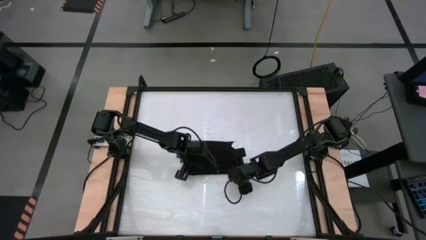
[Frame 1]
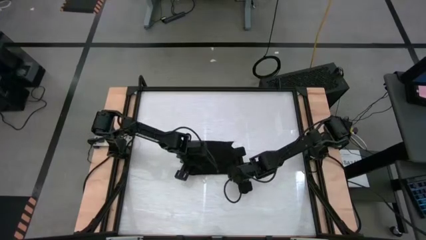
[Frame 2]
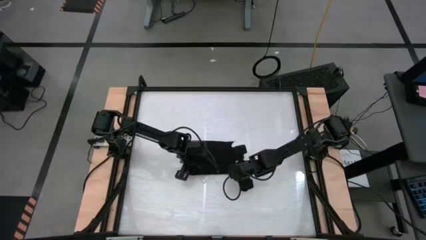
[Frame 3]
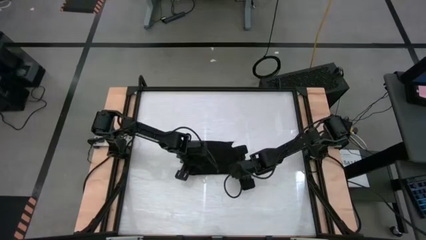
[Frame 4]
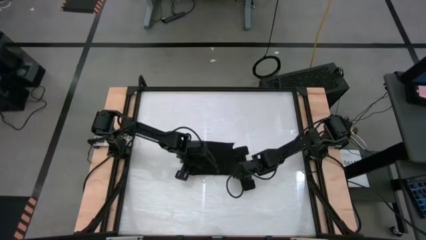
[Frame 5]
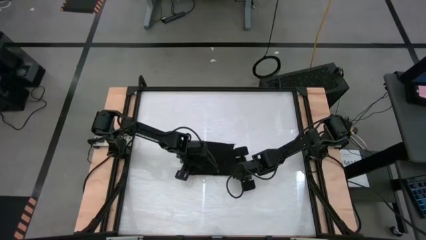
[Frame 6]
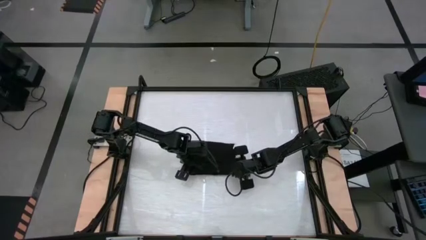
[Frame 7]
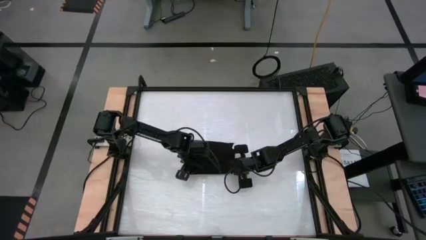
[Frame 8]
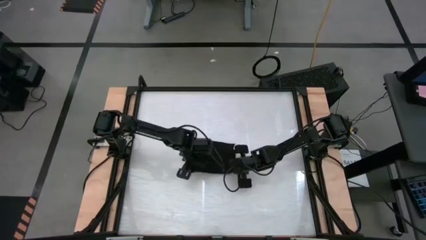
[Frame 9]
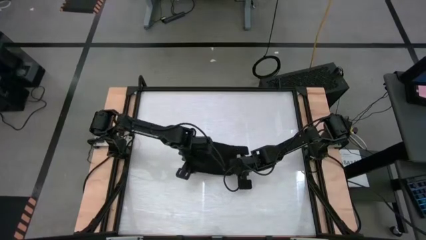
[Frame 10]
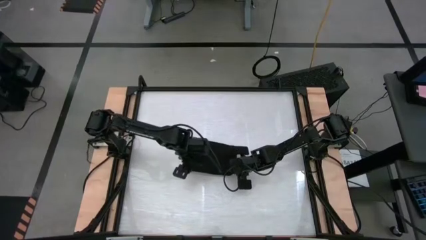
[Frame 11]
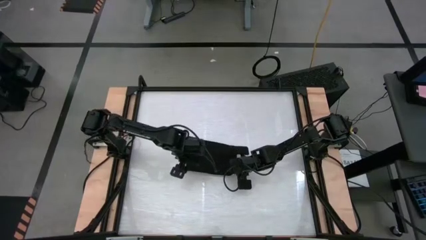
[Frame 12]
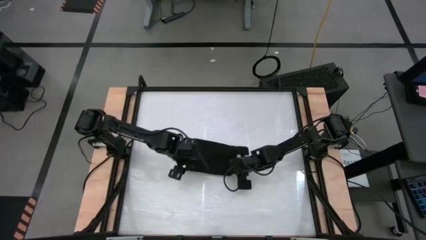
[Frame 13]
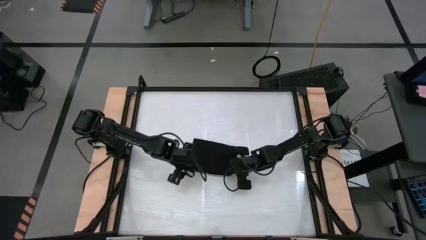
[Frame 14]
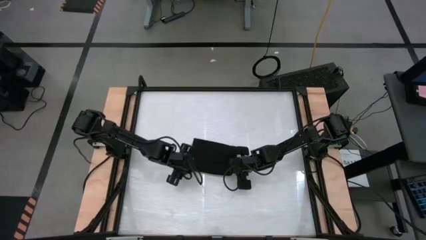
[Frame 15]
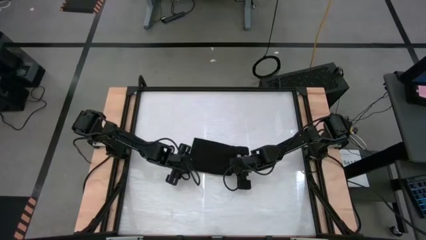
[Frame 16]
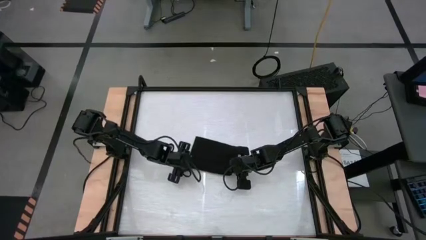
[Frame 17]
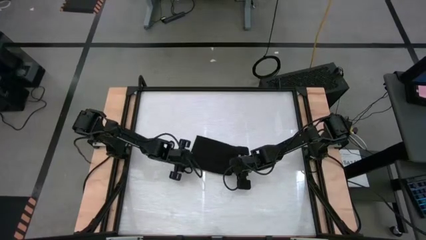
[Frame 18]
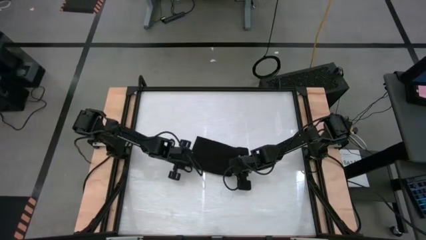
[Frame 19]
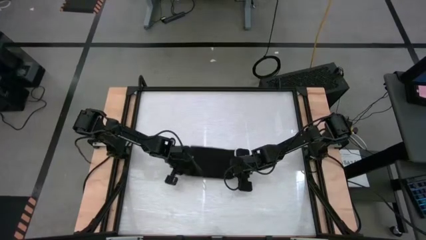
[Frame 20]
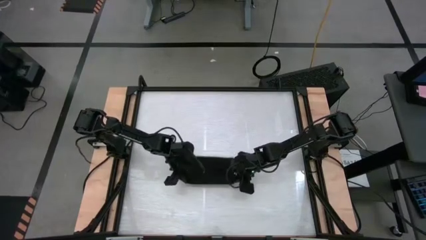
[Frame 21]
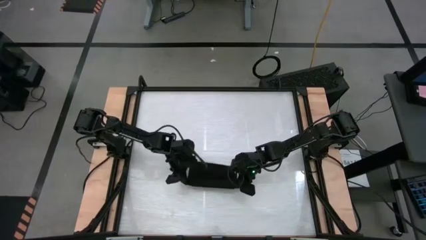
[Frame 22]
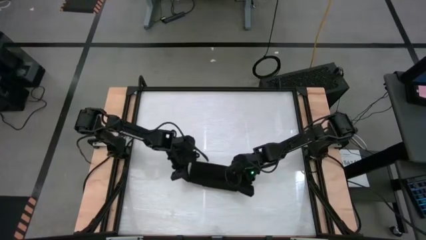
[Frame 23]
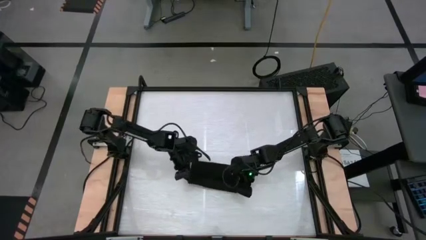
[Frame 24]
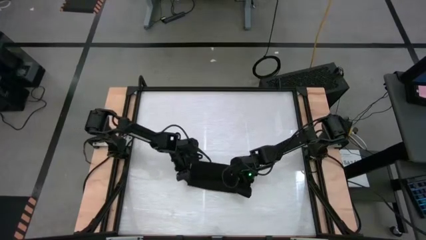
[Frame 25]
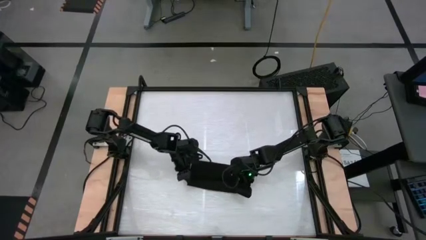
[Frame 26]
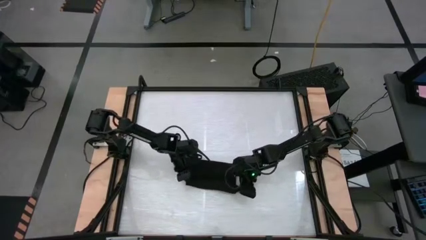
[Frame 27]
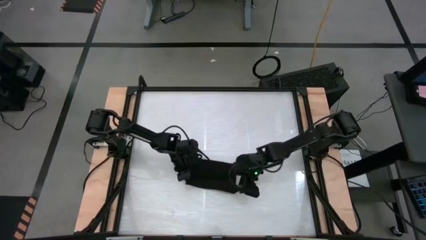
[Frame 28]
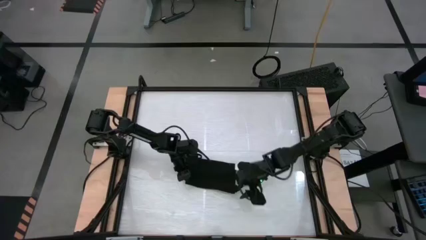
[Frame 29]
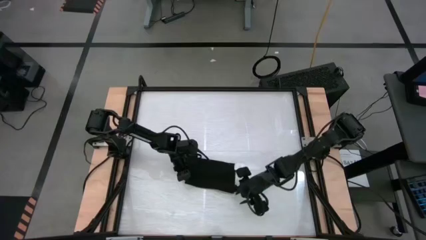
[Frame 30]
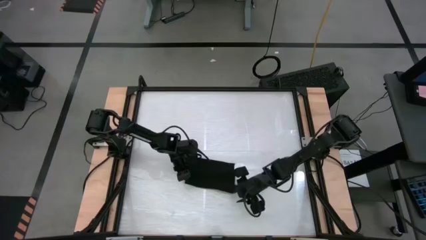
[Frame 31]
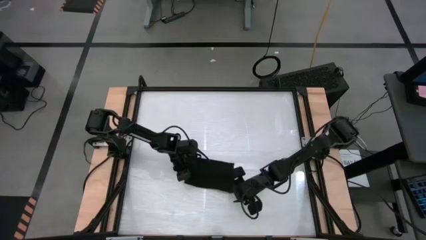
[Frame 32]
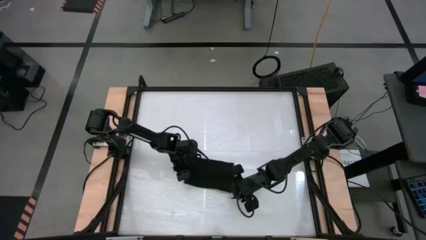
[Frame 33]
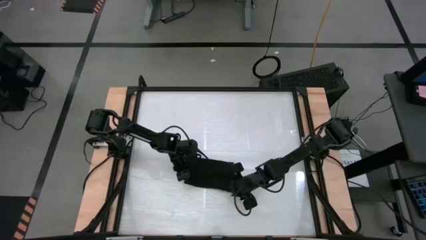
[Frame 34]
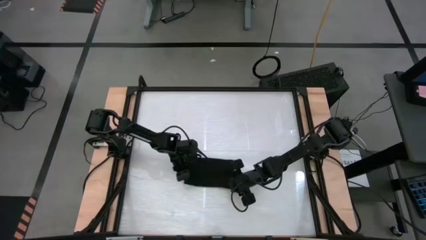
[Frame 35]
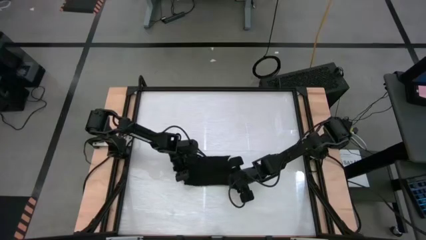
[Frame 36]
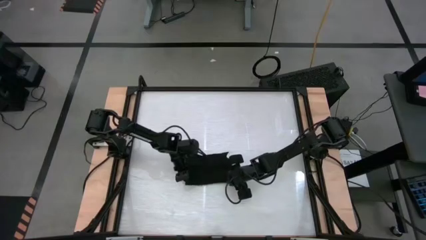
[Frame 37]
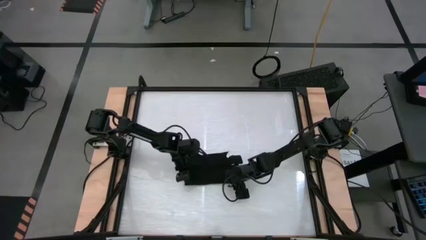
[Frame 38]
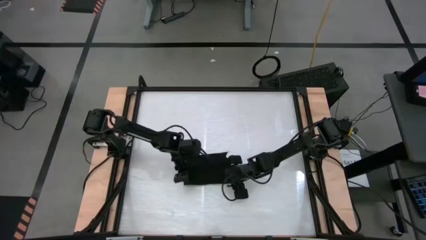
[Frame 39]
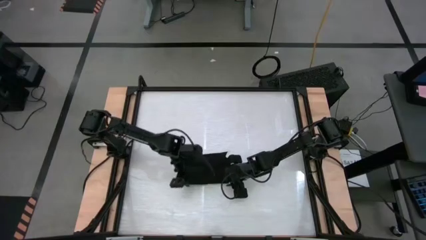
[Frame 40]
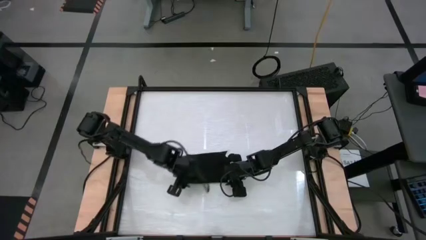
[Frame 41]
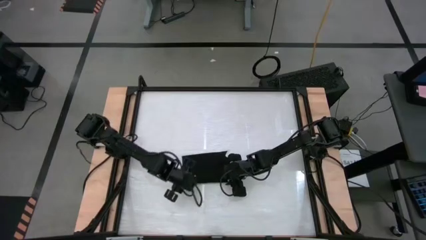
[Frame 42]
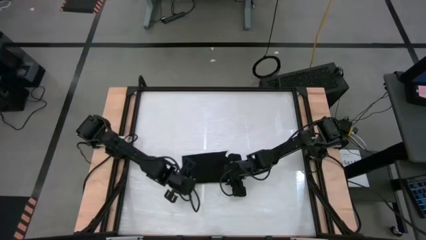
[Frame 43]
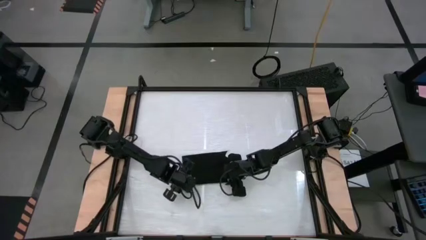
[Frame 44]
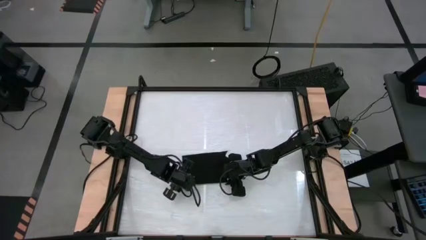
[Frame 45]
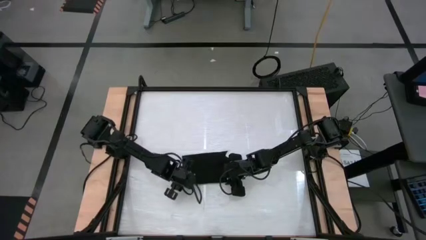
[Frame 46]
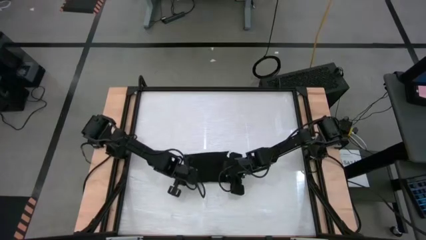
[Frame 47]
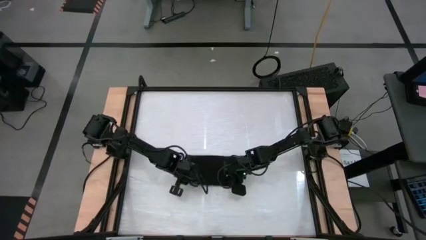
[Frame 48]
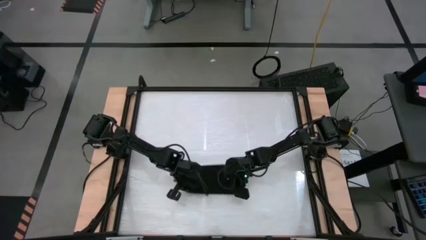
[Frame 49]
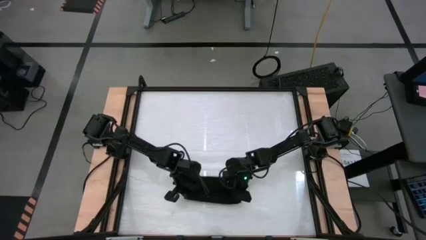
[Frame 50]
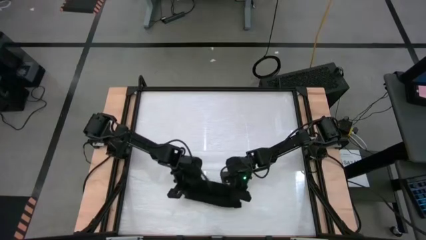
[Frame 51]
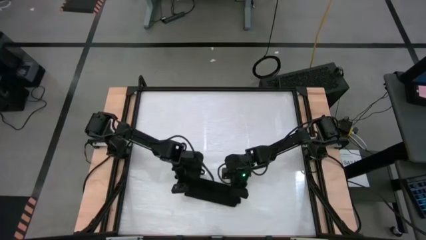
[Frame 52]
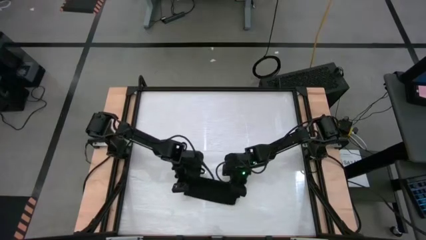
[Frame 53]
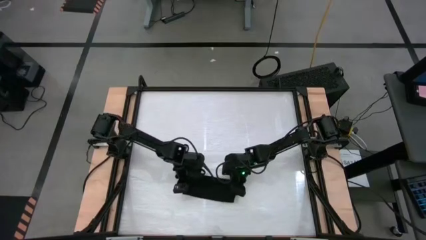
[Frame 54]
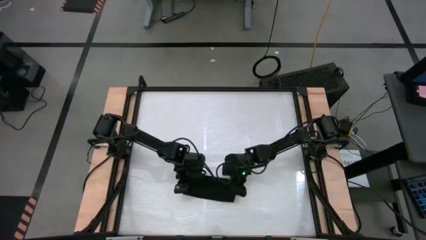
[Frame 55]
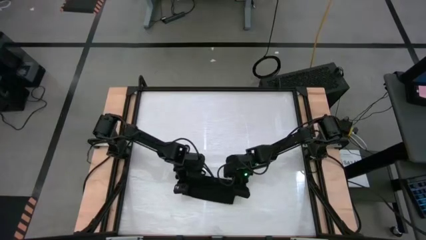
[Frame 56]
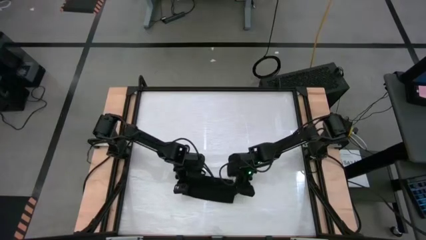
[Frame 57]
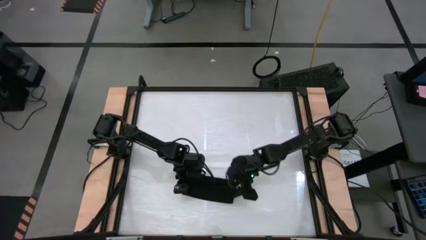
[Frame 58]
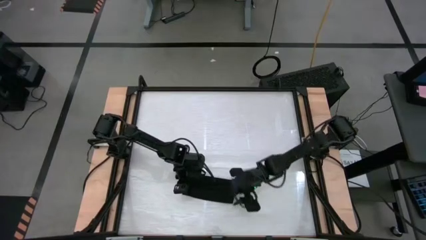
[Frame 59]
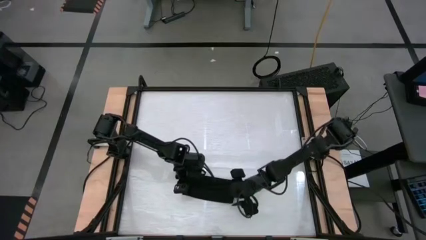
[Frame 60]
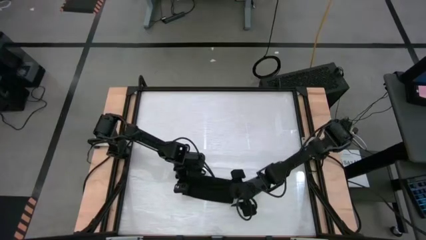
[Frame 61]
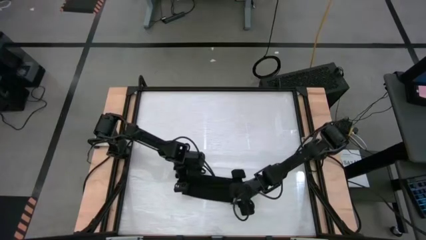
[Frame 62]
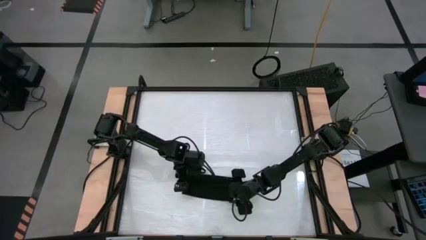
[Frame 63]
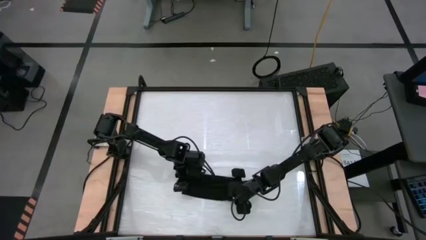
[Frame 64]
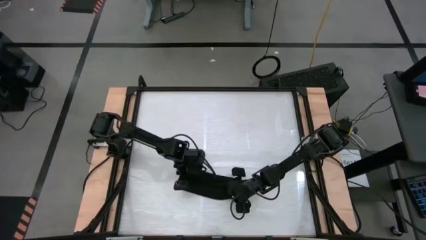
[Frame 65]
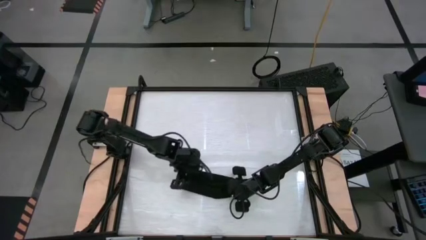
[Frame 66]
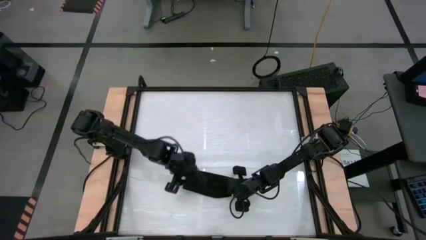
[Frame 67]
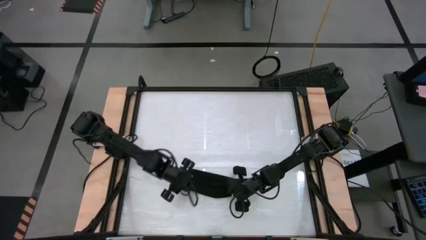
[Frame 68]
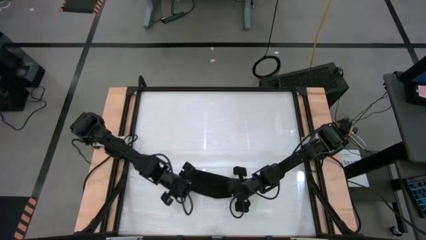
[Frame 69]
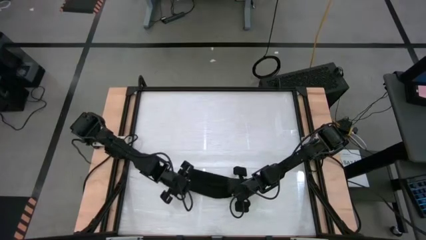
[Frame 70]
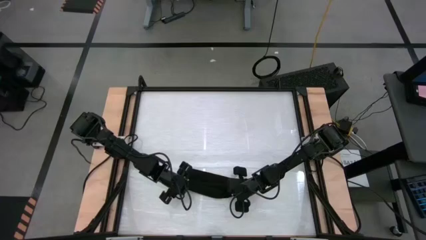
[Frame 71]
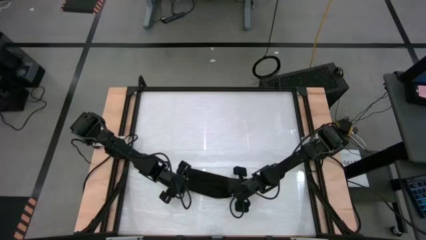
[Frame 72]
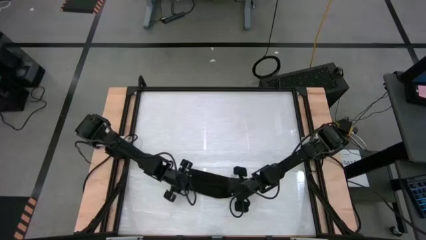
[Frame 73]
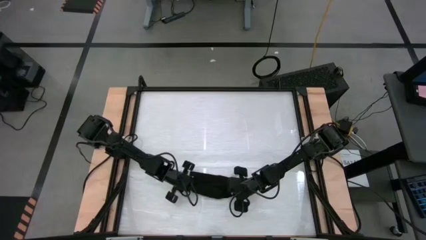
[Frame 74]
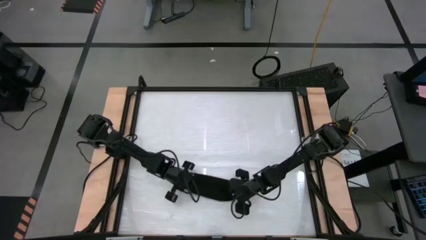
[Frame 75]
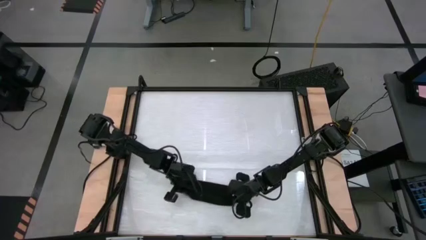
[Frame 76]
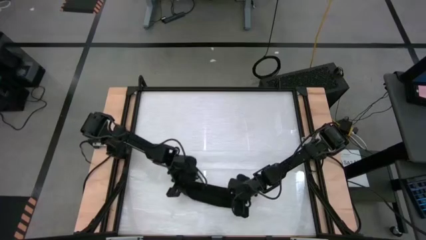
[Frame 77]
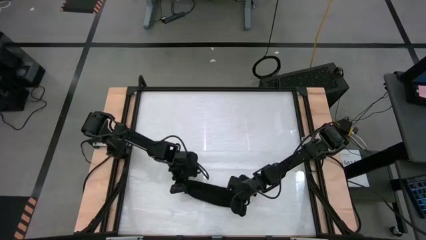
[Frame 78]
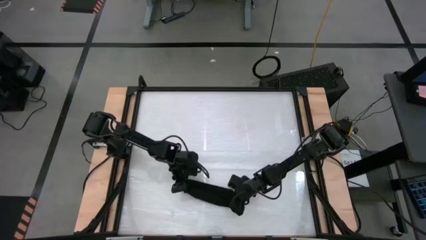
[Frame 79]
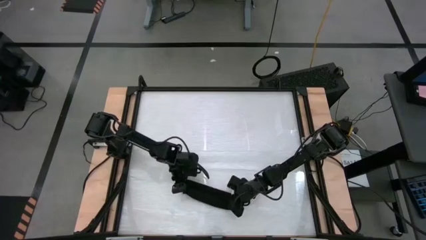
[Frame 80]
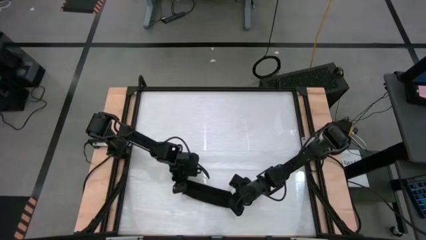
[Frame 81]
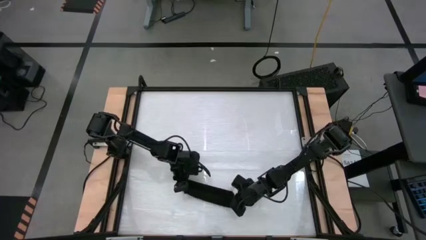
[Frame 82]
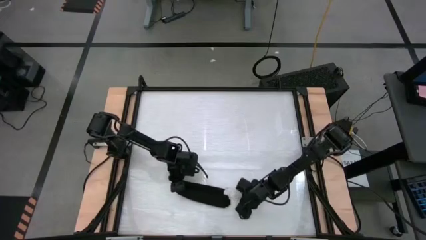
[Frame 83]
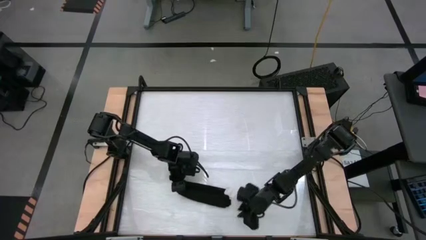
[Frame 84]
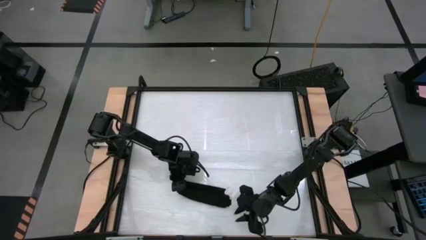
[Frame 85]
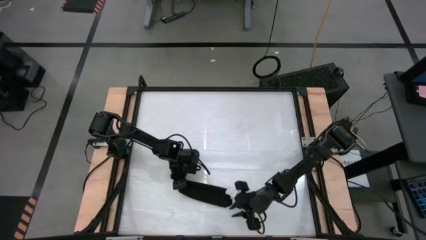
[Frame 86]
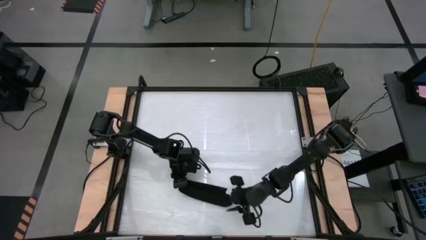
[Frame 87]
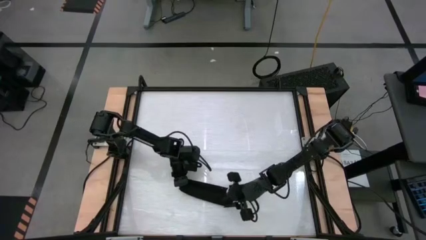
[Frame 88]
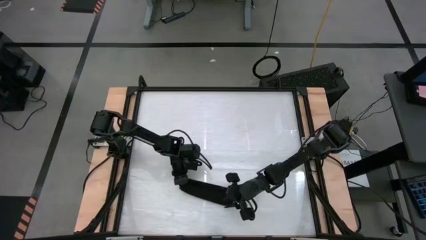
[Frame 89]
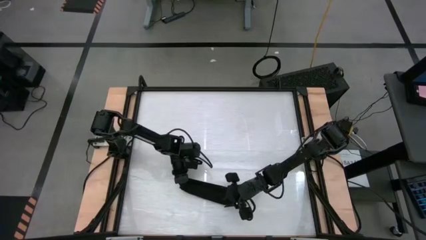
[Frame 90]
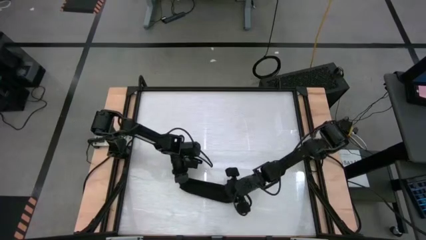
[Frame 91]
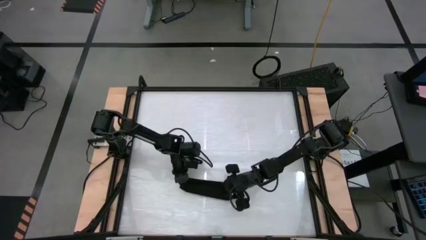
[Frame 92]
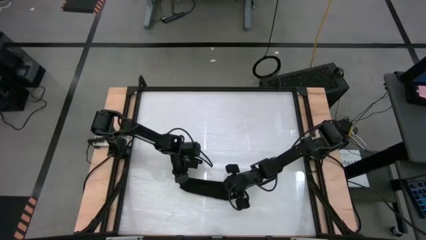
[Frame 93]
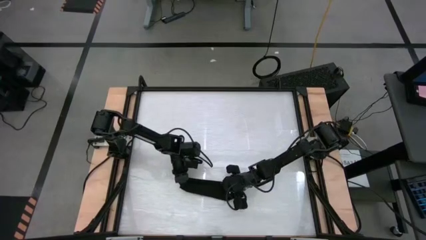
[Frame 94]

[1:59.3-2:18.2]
Task: Roll napkin
Roll the black napkin
